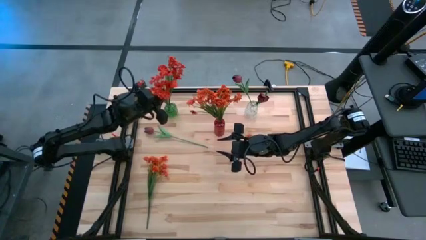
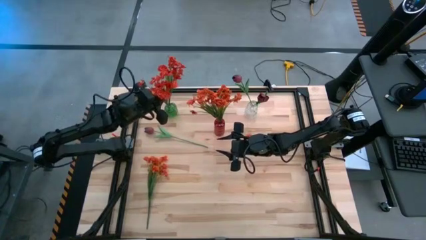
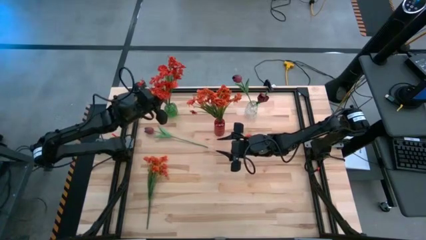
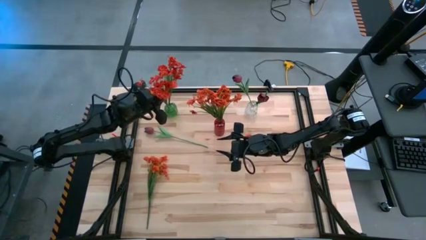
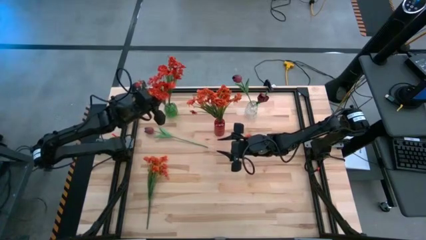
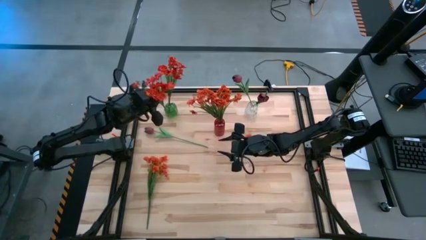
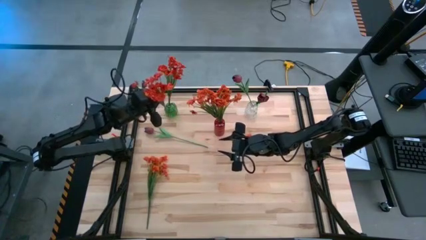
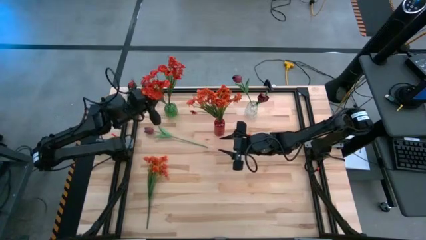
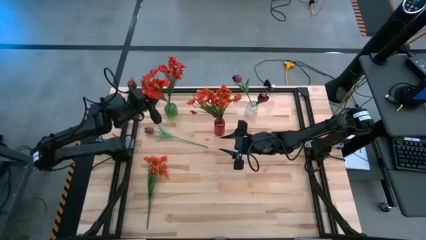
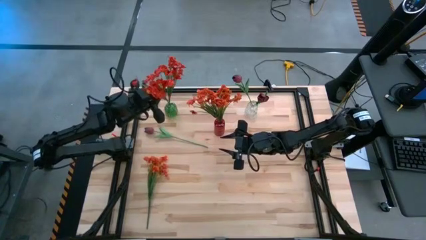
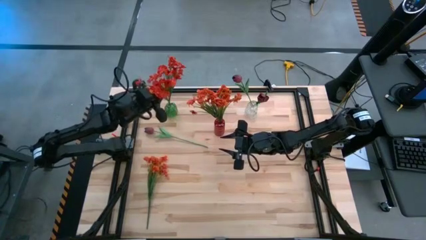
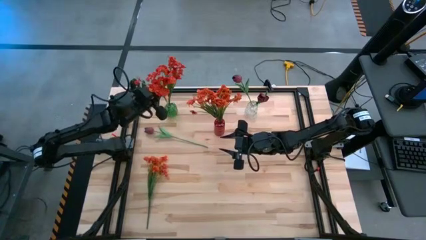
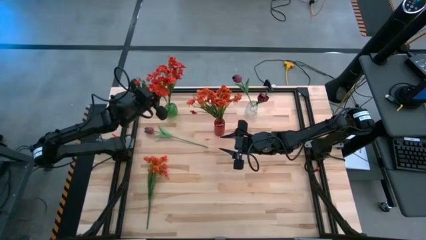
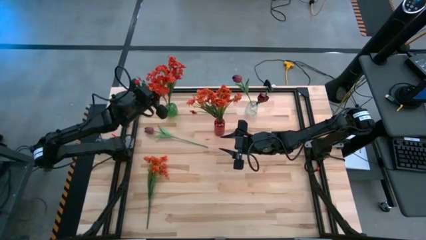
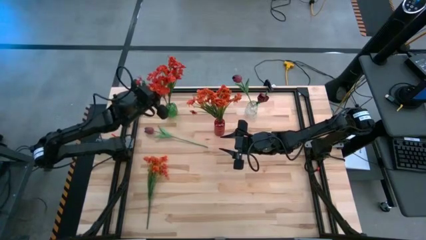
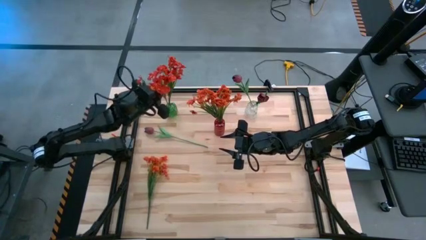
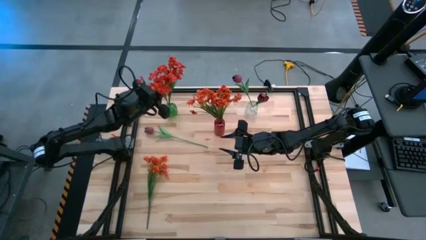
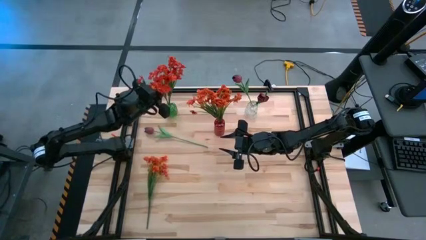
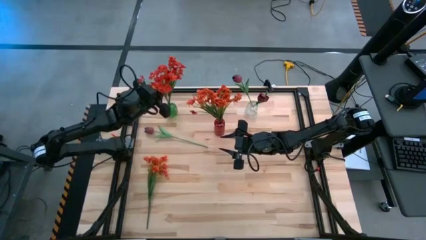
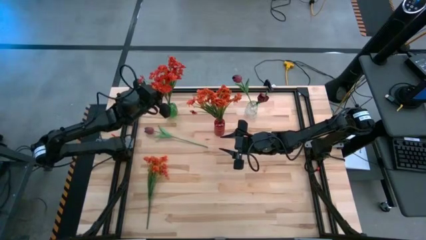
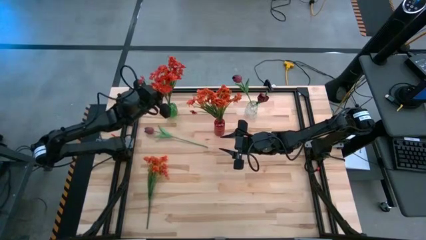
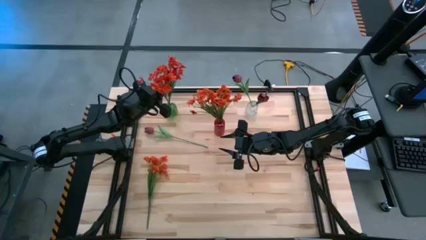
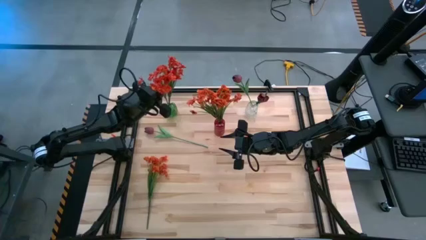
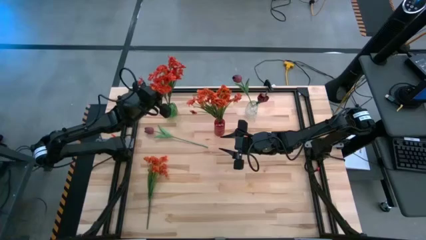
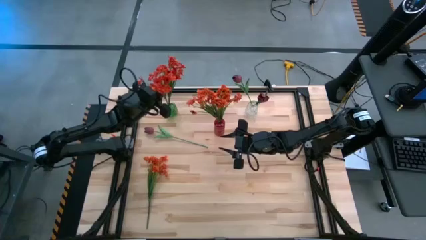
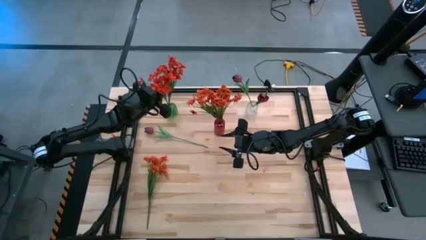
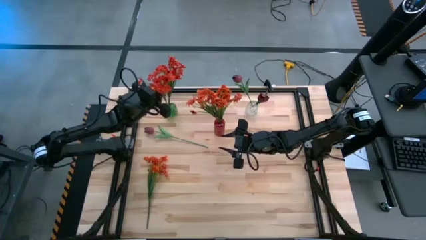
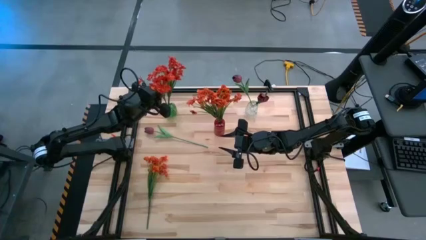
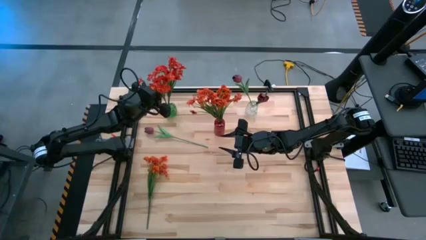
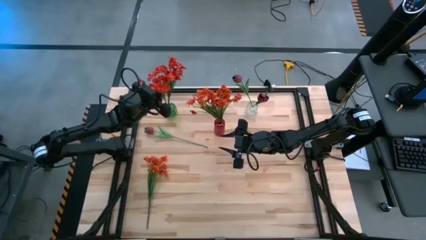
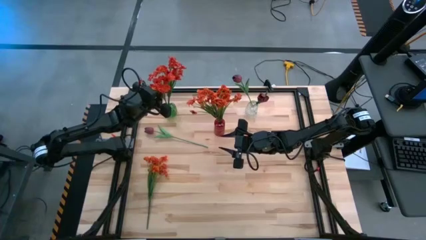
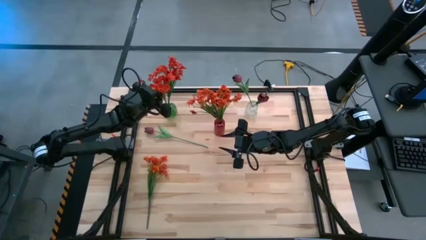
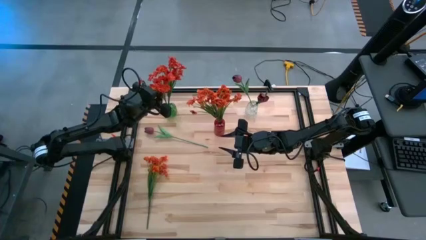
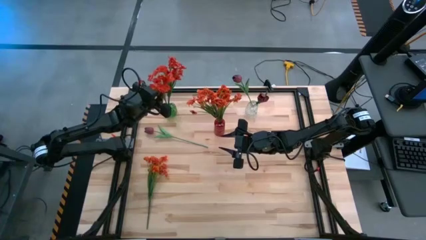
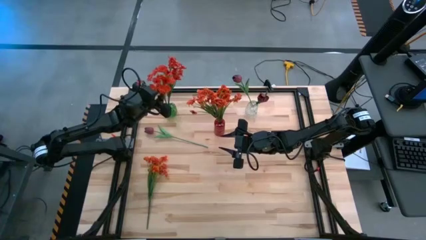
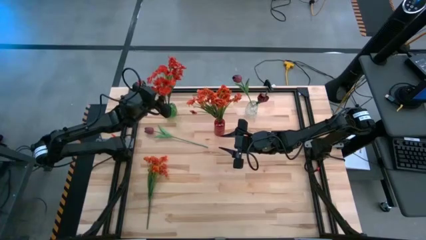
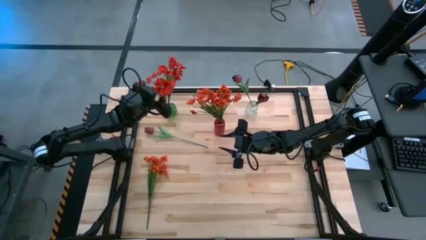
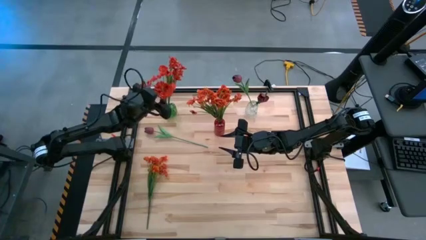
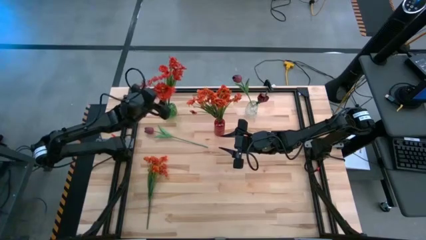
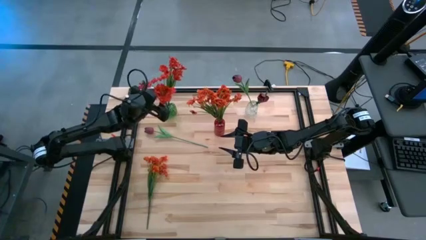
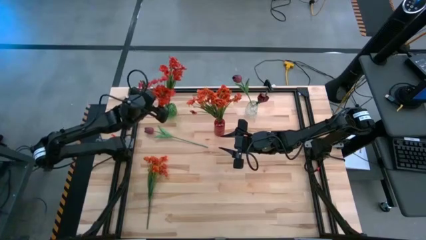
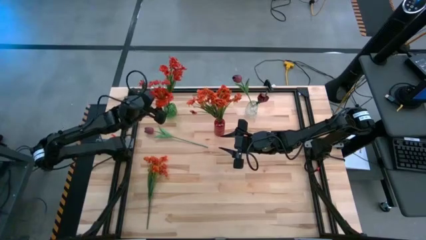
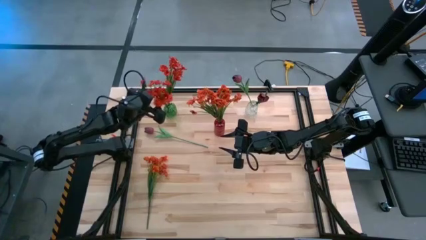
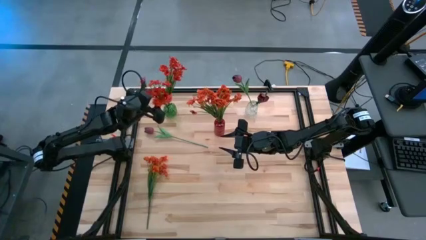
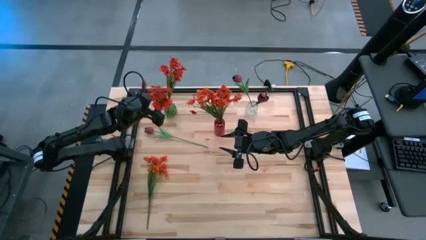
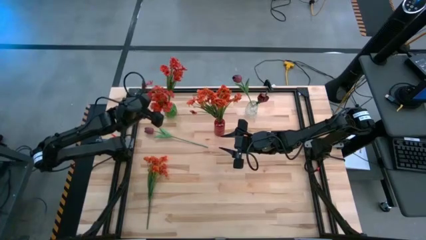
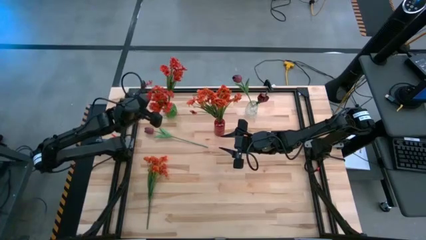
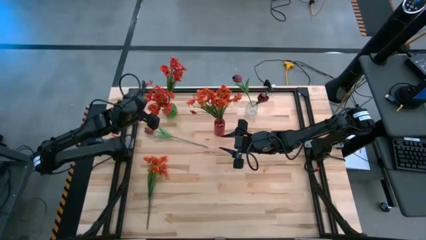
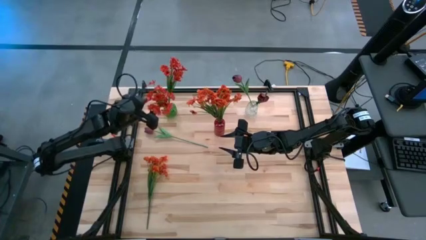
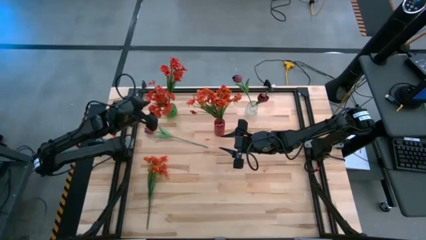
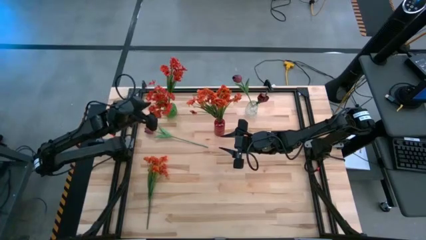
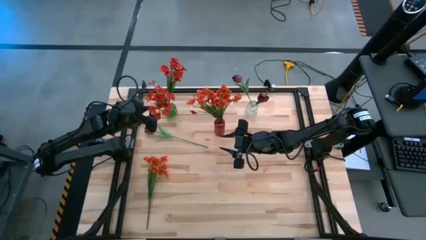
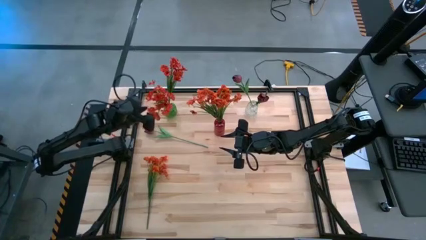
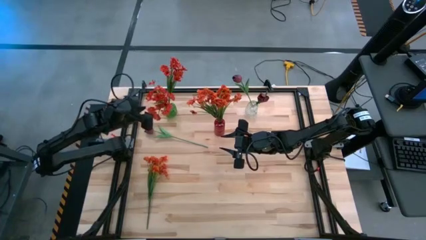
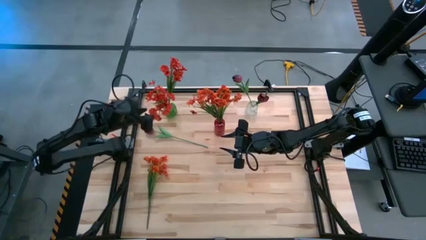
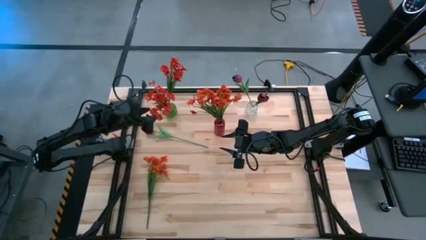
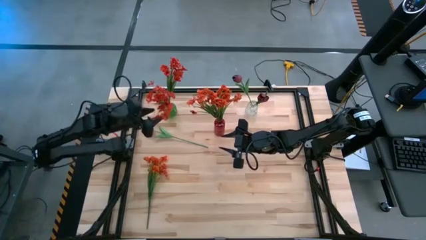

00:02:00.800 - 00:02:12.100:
Task: Sort flowers into vase by color
Put the red flowers into the green vase

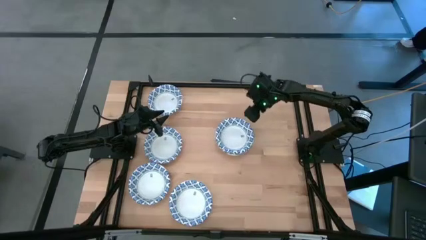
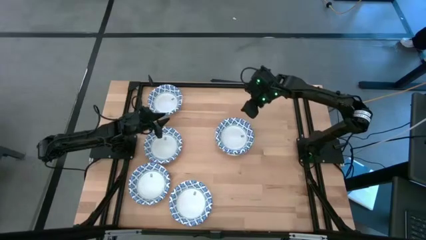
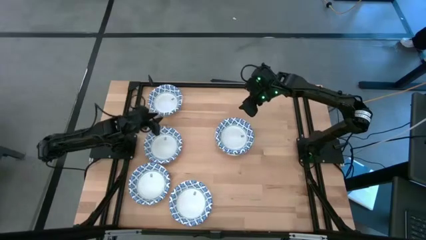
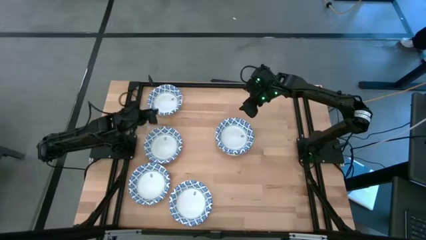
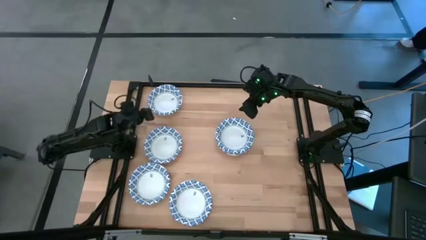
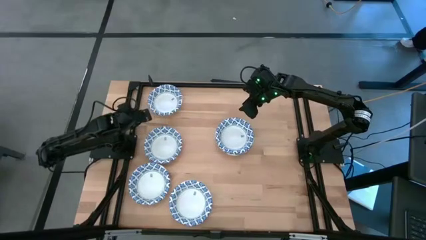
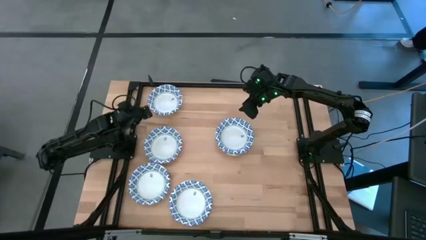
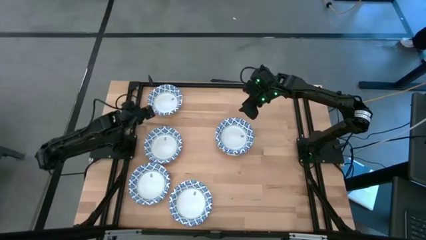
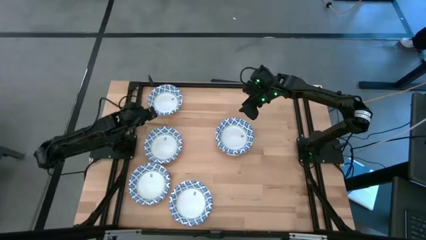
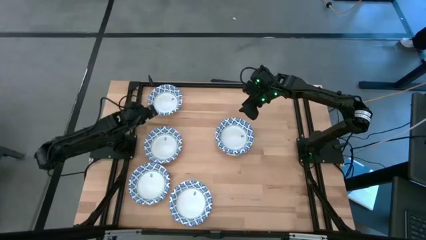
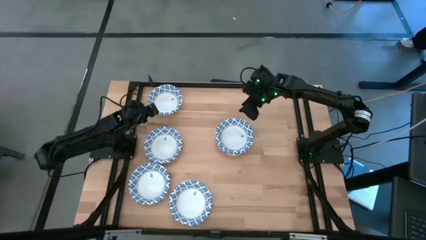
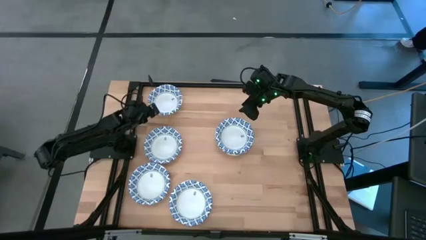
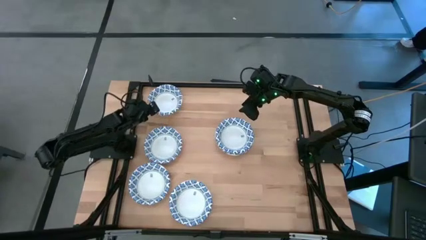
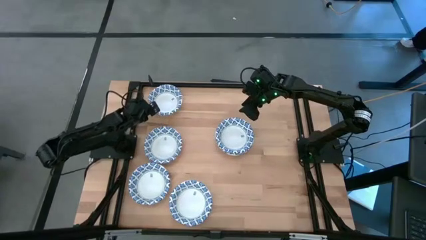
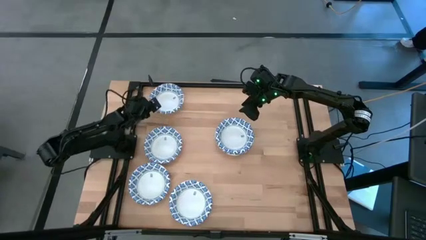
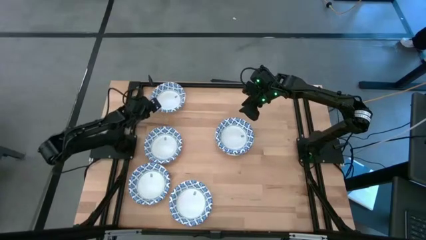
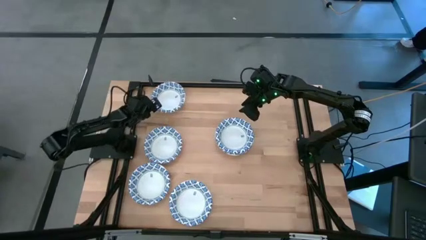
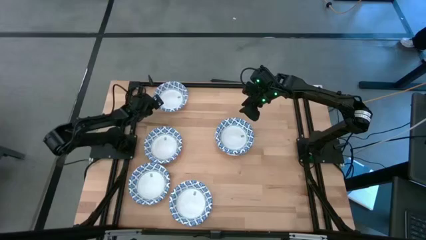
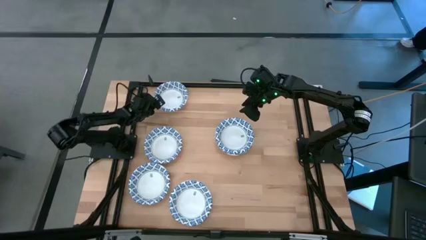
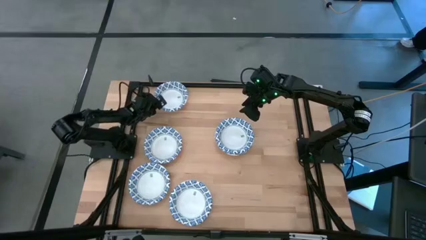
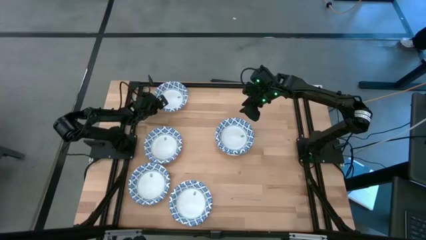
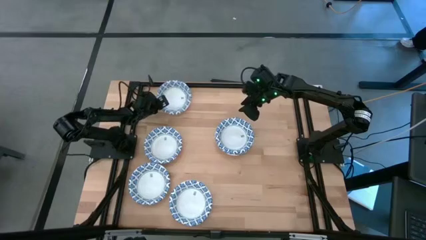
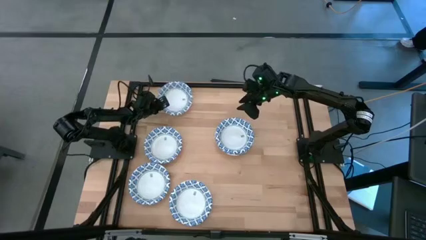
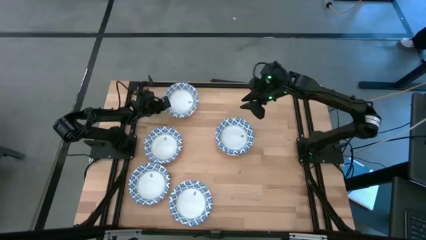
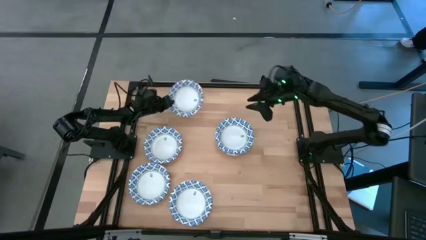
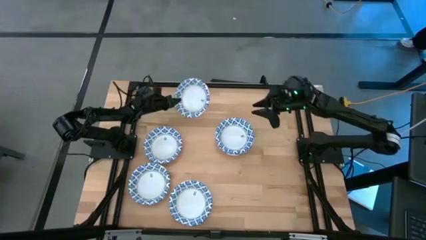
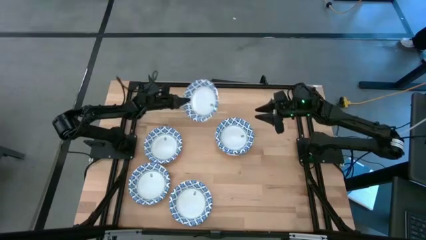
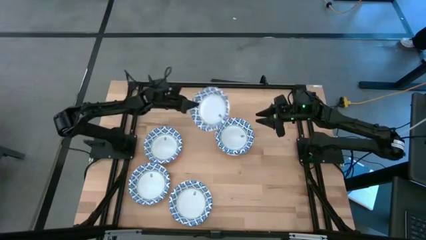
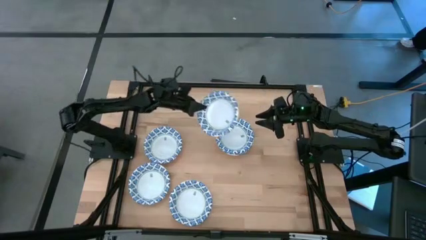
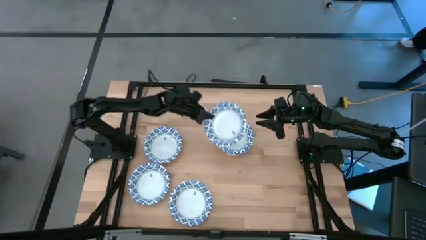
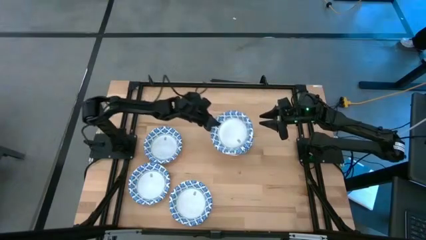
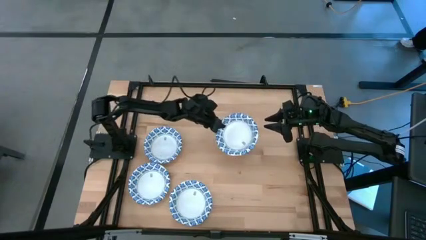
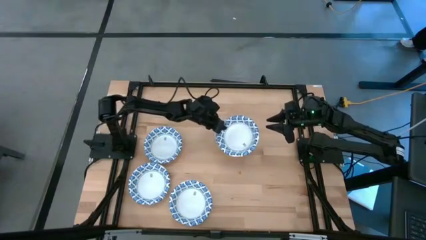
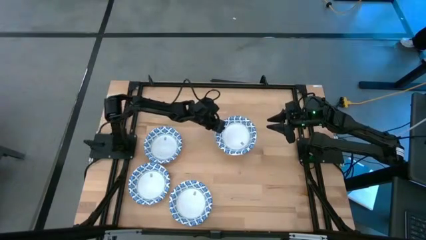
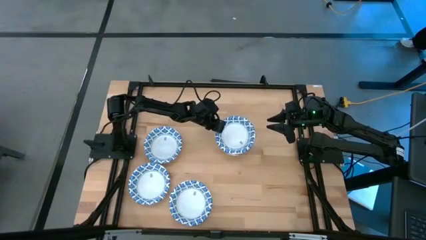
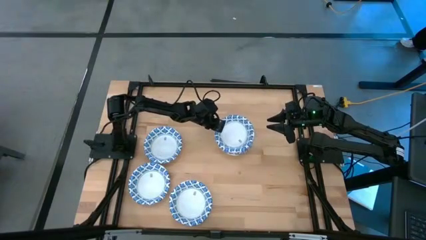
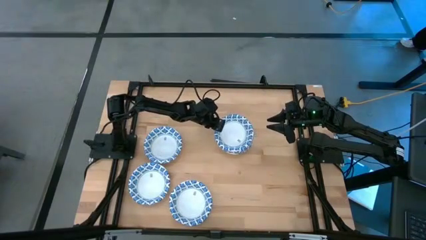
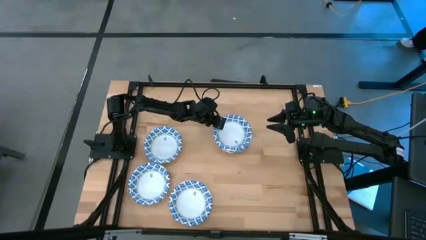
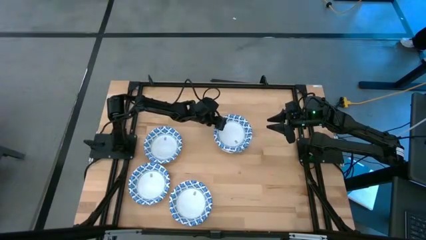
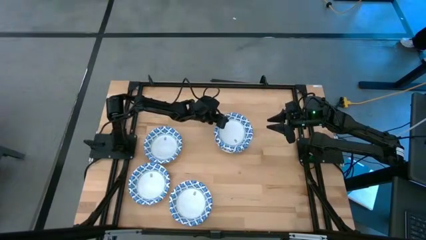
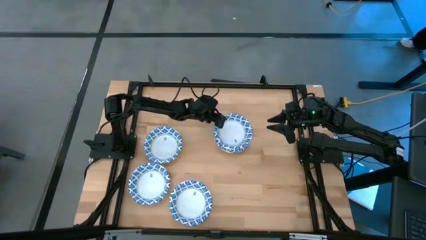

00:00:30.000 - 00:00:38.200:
Task: Nest bowls inside each other
Stack the blue patterned bowl on top of the other blue patterned bowl
